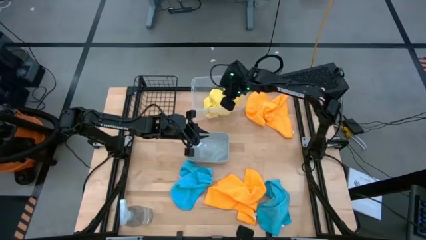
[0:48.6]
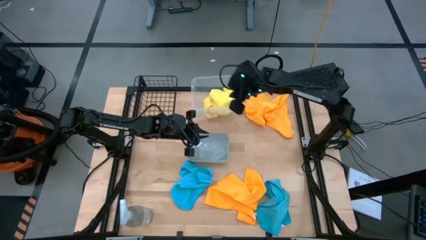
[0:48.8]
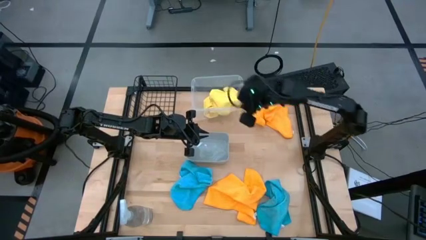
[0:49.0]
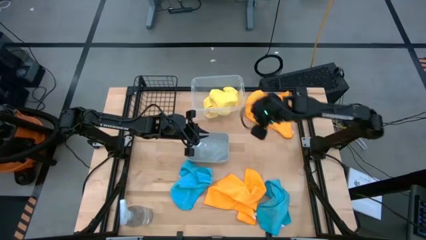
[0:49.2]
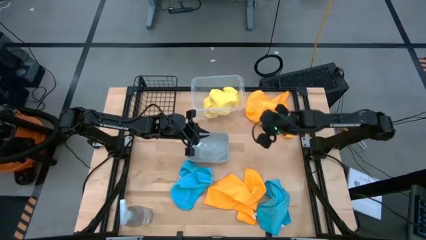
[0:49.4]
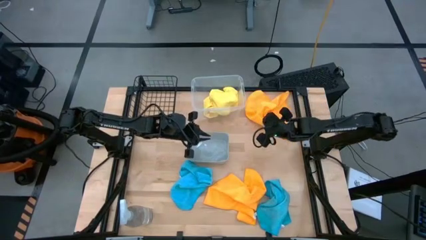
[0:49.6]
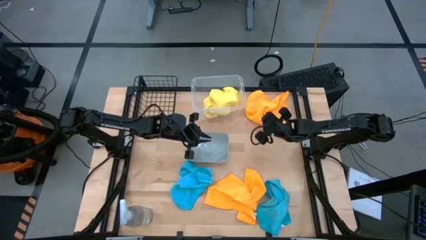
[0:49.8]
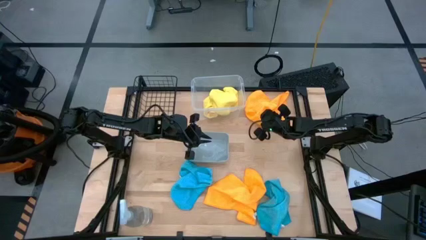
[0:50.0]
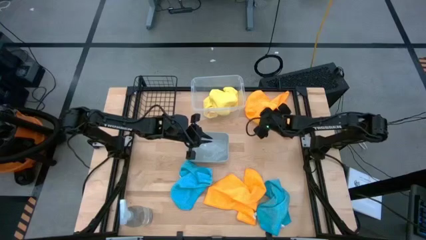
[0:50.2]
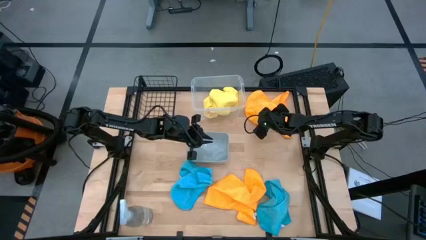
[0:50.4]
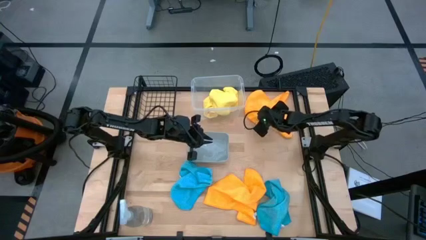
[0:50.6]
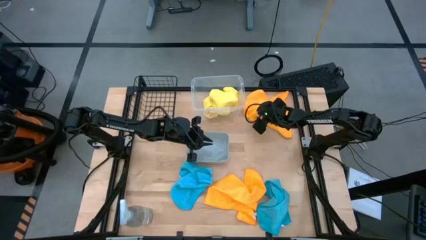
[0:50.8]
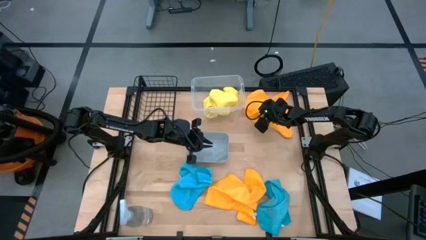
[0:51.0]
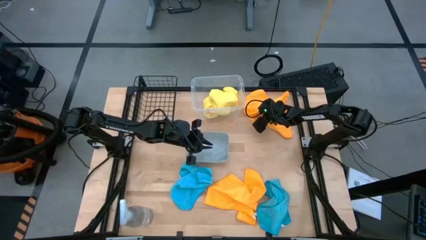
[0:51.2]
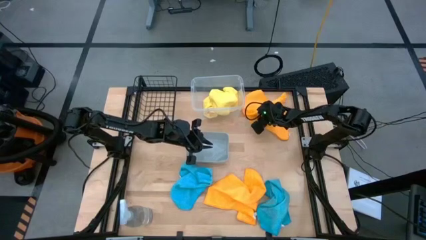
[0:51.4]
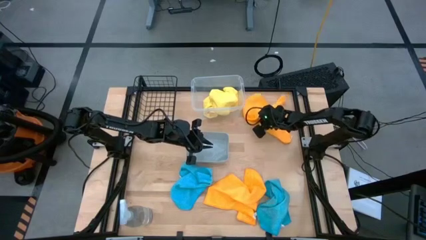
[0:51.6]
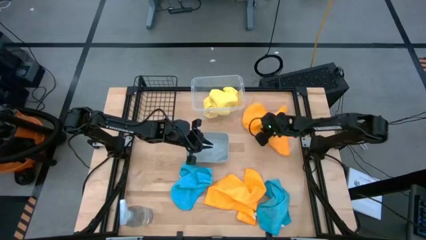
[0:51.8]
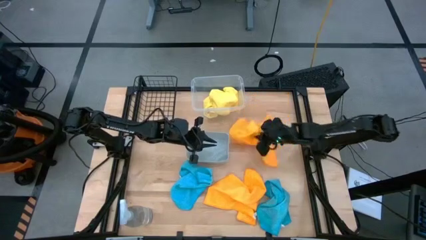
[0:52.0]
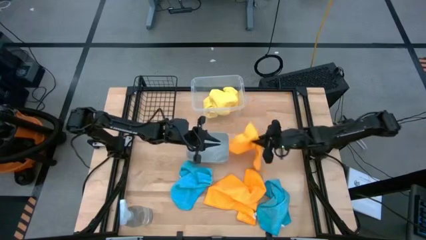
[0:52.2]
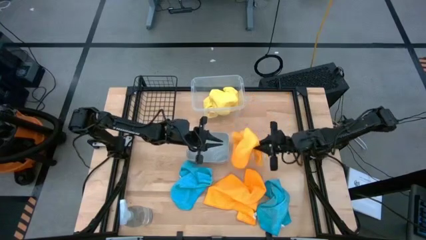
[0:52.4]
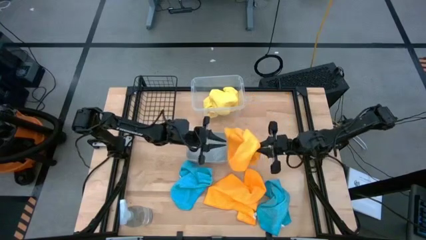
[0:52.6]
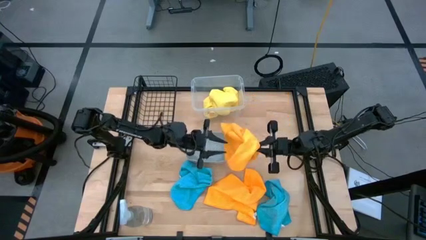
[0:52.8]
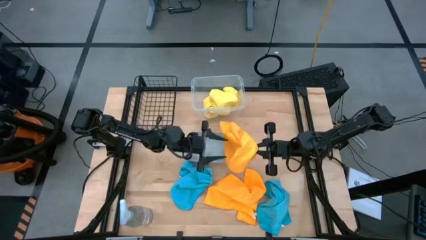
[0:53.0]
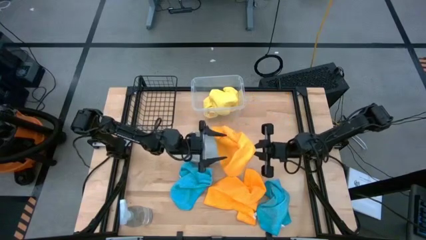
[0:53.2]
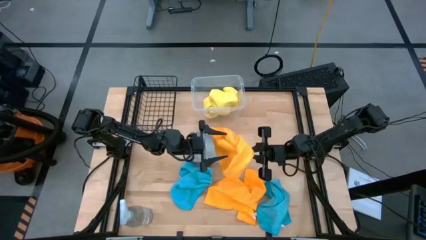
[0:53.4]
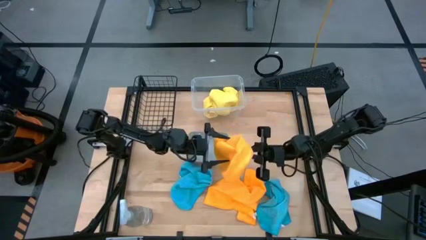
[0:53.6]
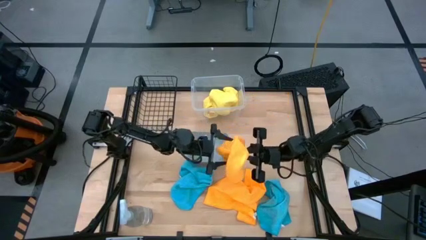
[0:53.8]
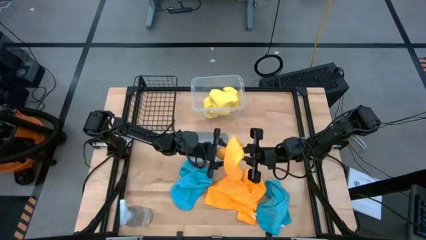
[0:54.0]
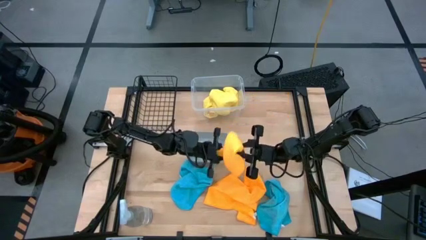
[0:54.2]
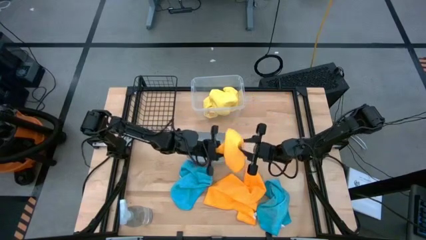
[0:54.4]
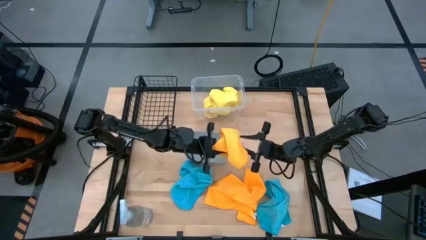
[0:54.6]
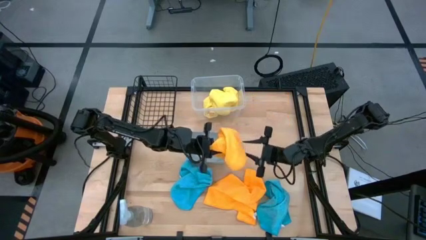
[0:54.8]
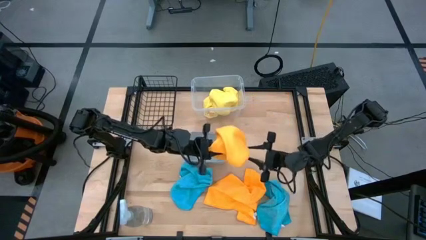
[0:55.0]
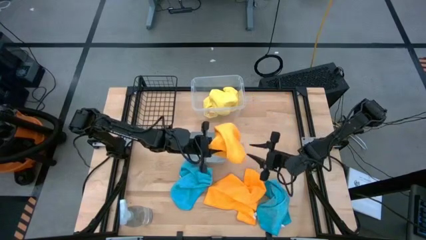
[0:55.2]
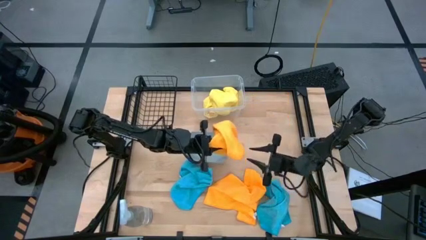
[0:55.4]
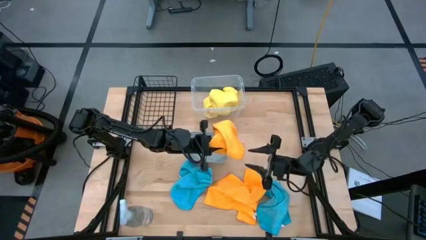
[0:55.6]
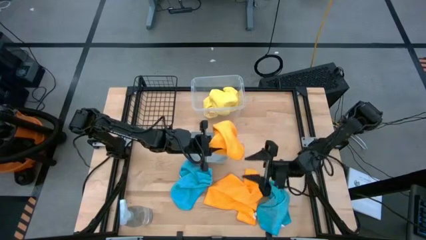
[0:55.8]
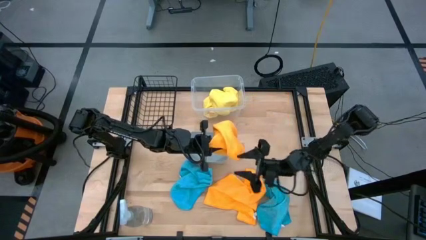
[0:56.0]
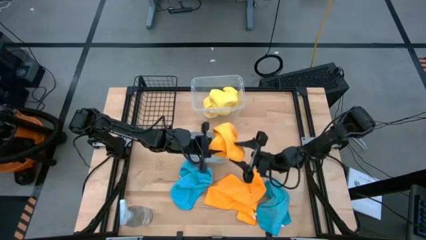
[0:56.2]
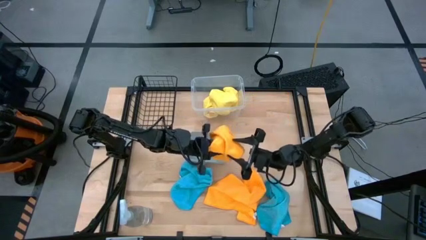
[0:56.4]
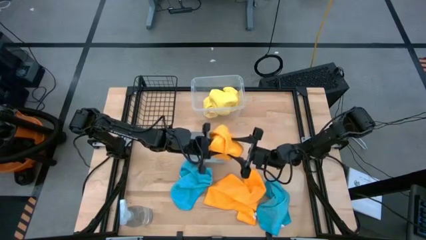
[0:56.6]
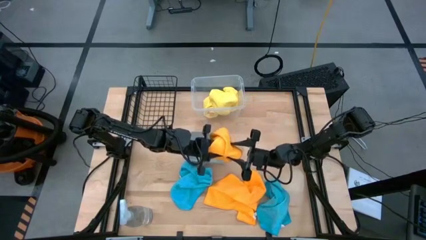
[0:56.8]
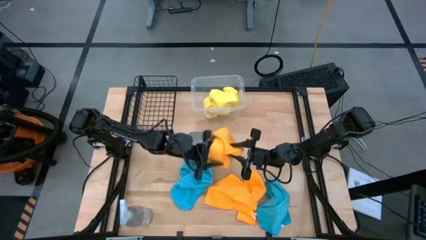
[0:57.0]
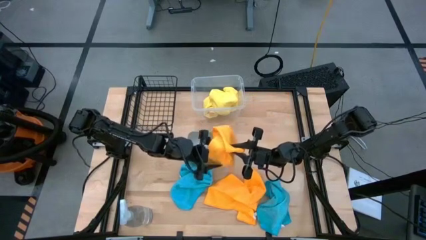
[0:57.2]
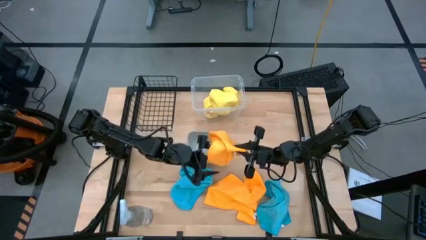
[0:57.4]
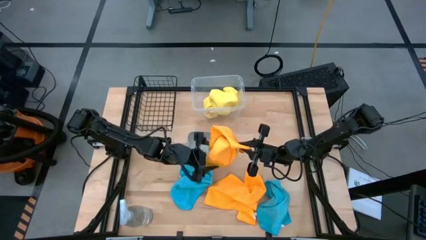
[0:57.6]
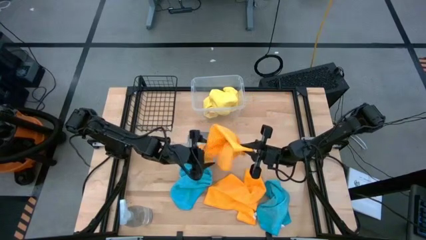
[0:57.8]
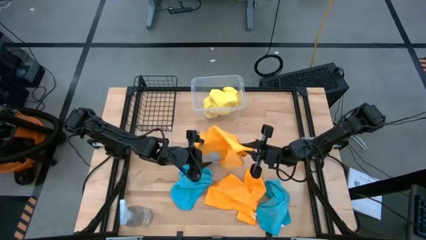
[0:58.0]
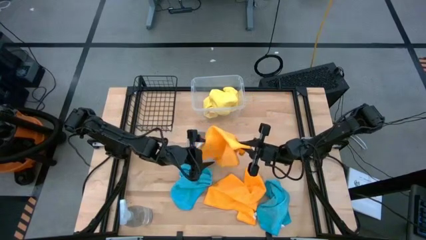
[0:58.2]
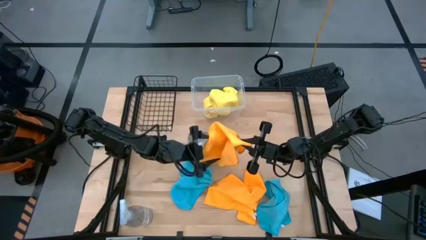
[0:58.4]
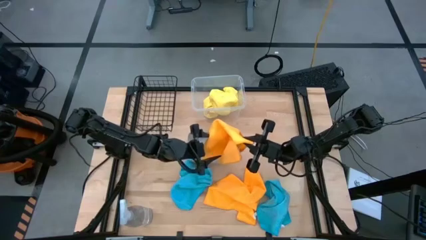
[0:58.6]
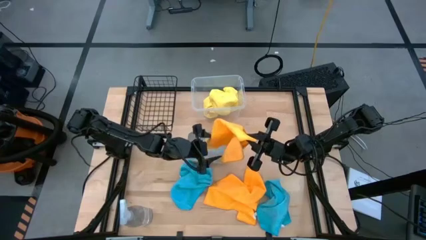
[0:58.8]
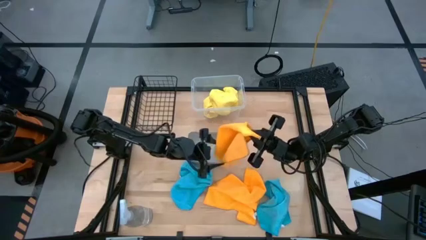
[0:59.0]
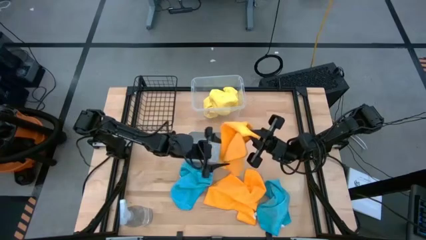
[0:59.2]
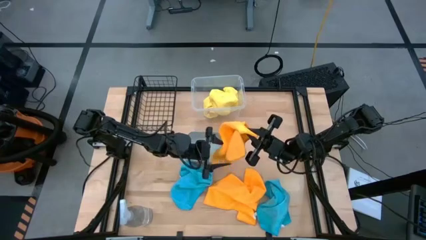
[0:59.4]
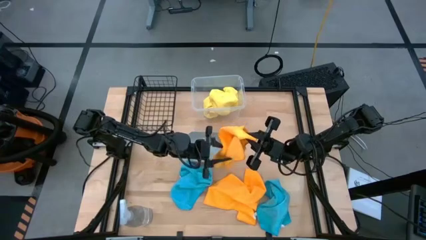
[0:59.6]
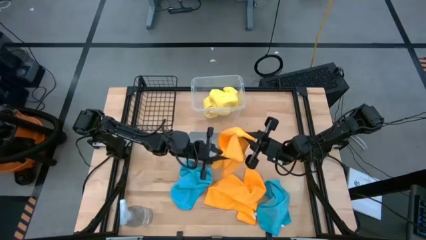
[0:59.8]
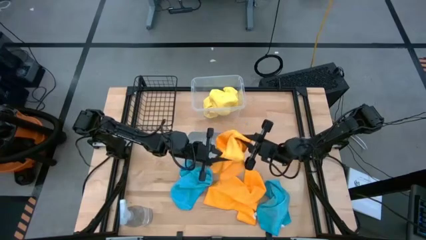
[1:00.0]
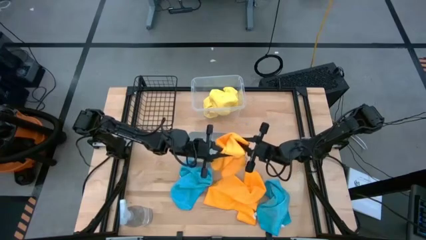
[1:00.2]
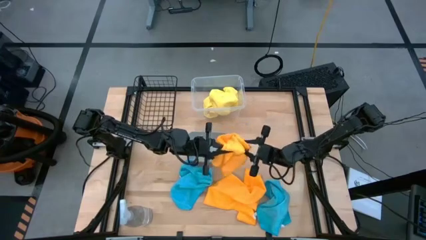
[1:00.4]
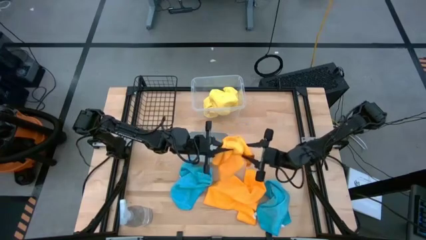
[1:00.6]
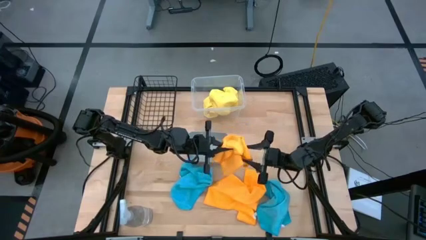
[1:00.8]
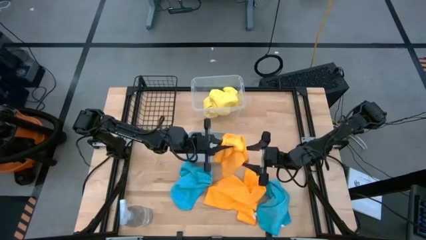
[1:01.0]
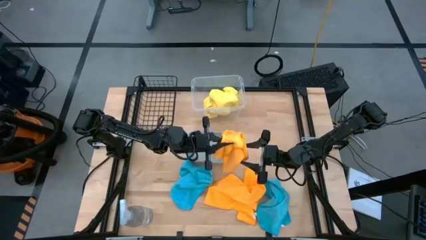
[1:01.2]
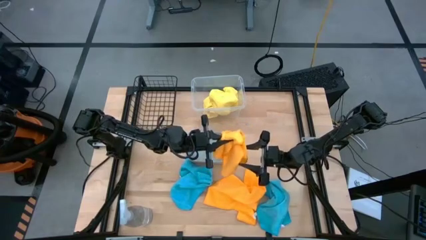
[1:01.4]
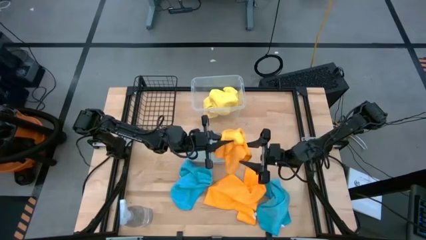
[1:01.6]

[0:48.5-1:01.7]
Task: Sort microfiber towel by color & place in baskets
Put the top orange microfiber cloth into the gray bin

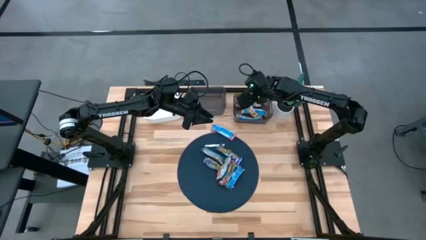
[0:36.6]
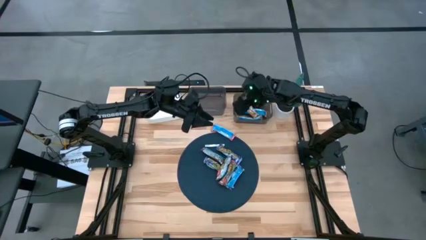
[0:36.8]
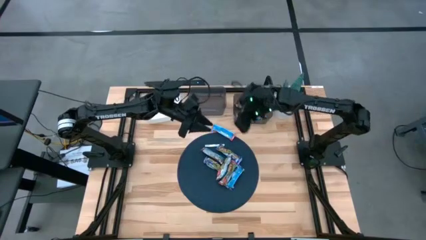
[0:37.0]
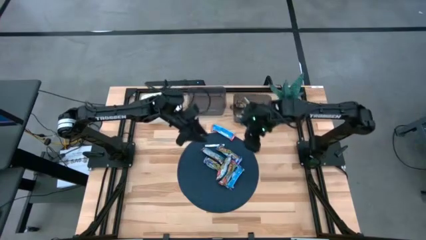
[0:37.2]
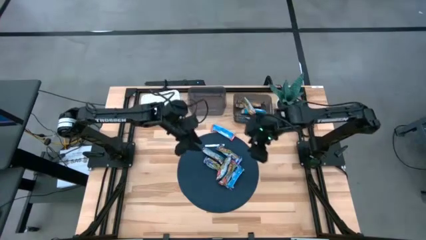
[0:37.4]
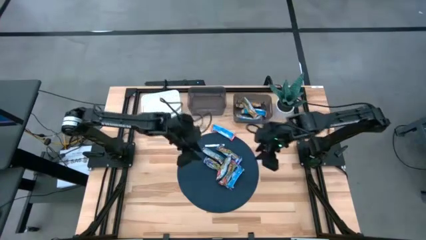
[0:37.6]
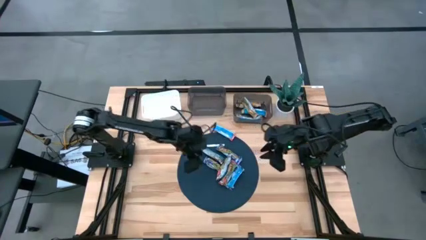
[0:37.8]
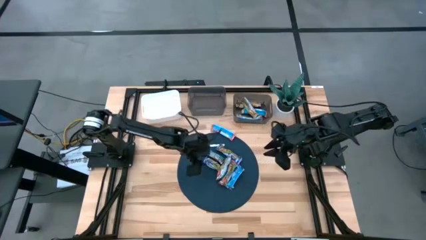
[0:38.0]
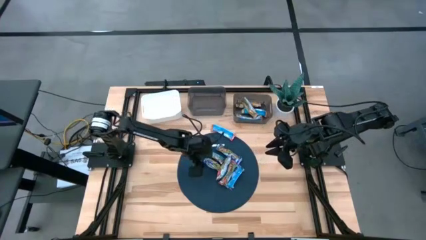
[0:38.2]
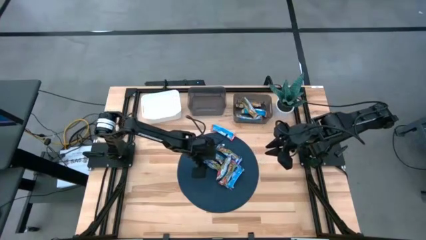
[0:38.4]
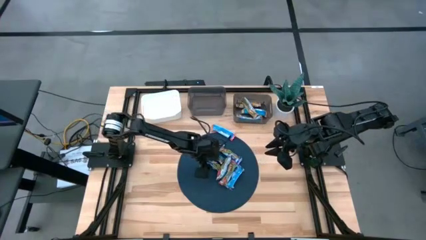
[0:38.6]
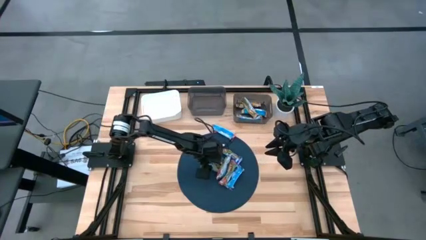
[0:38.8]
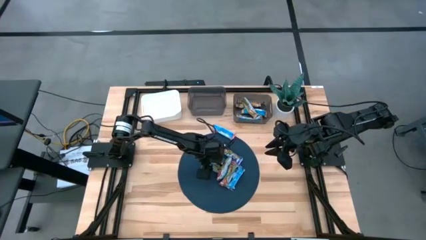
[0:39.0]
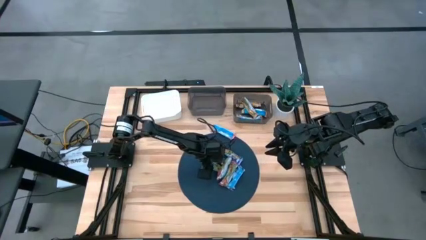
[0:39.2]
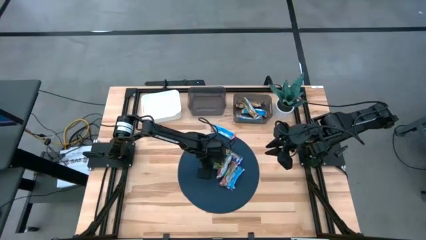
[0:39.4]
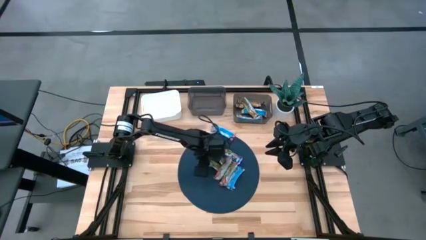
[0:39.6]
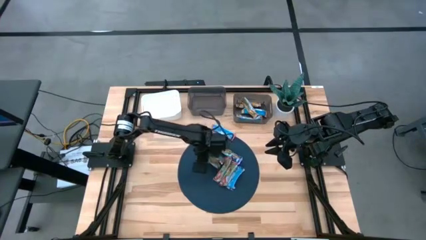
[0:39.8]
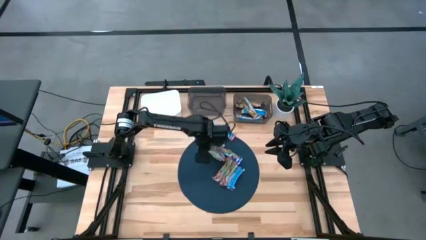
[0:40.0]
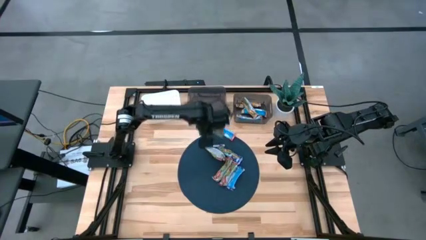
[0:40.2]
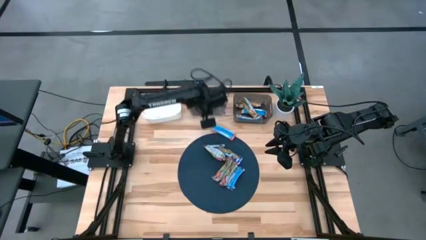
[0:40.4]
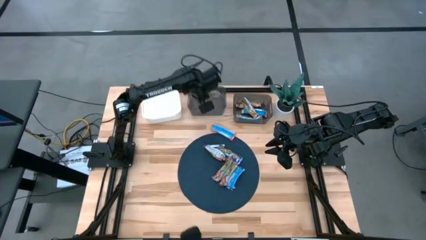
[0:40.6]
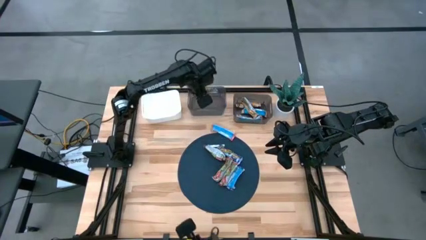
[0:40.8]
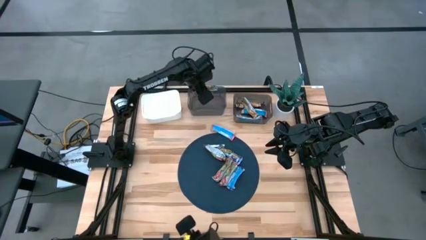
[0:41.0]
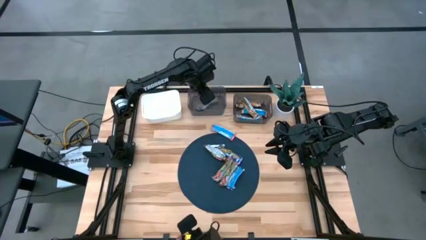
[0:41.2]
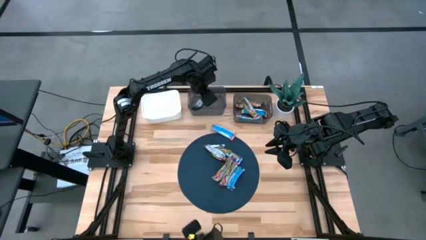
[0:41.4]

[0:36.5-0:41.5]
Task: Pick and place Granola Bars by type
Put the blue granola bar into the middle black bin
